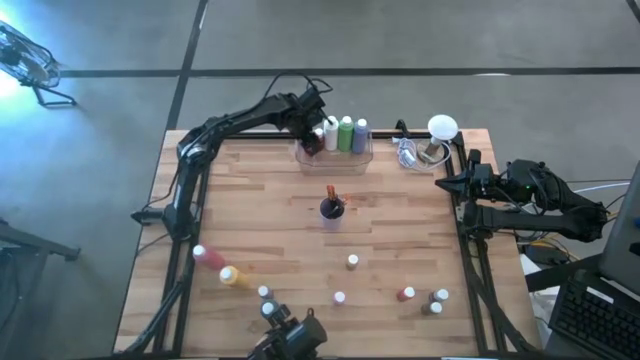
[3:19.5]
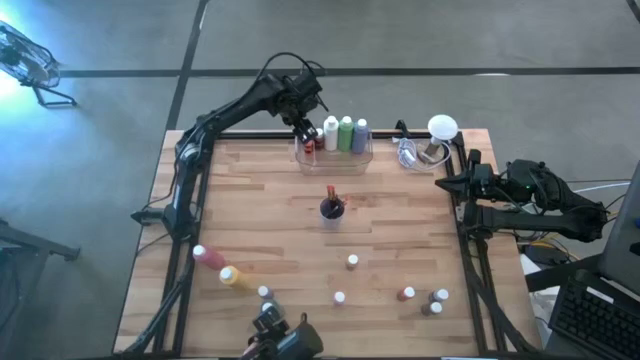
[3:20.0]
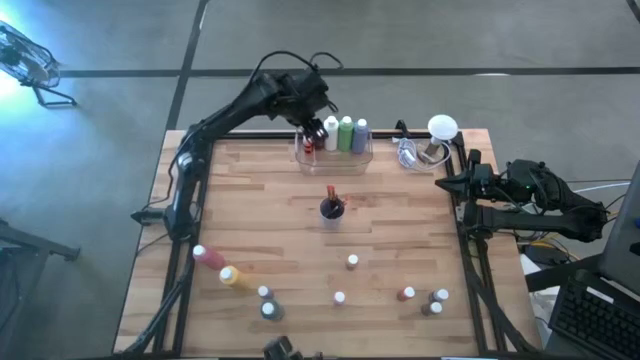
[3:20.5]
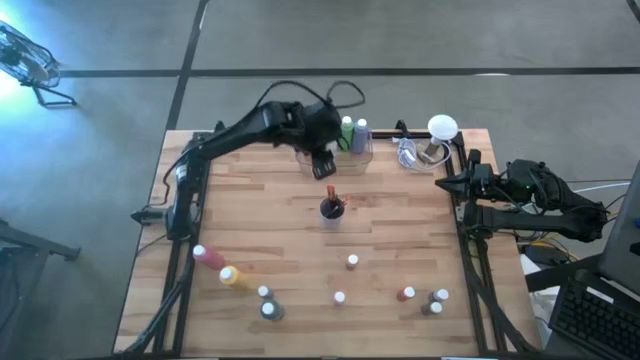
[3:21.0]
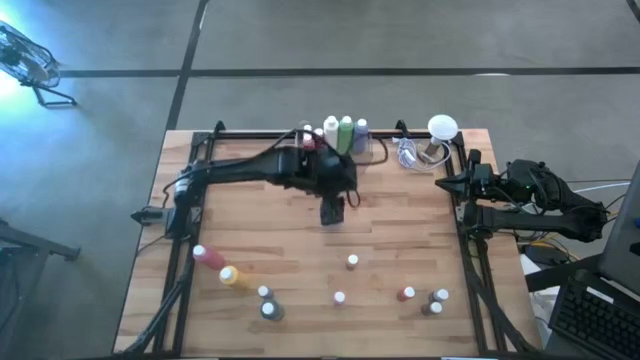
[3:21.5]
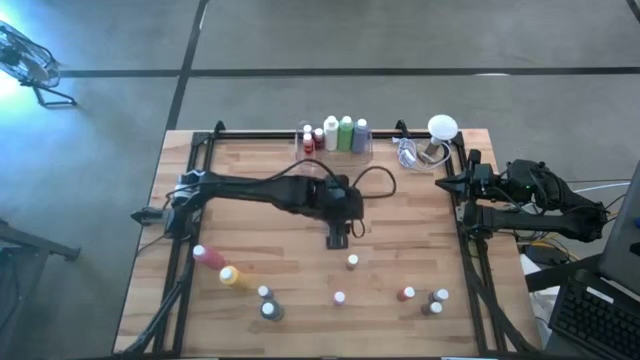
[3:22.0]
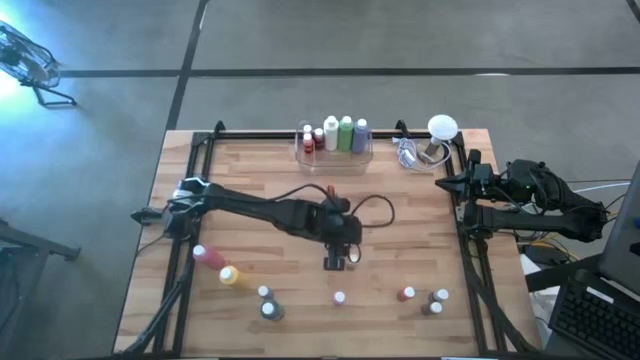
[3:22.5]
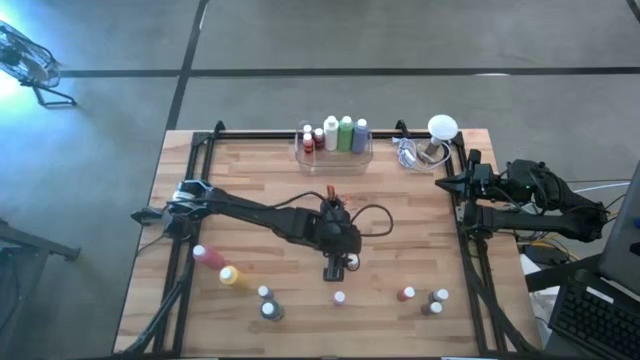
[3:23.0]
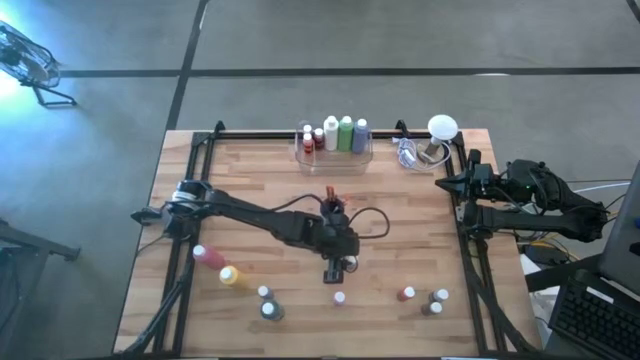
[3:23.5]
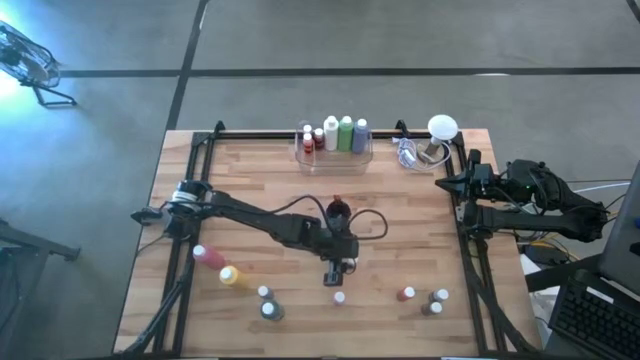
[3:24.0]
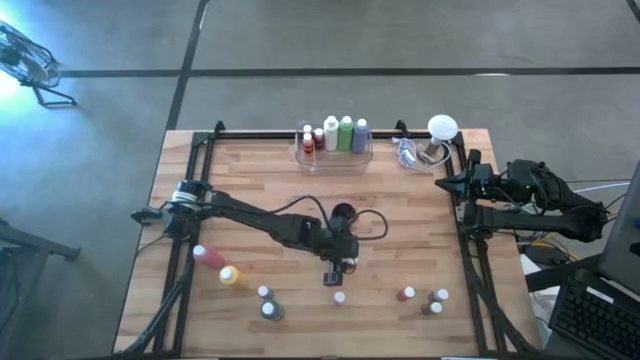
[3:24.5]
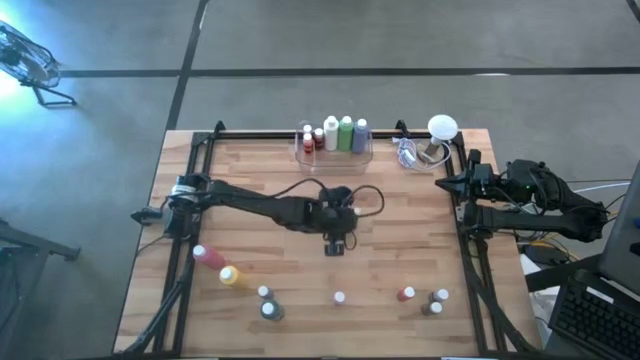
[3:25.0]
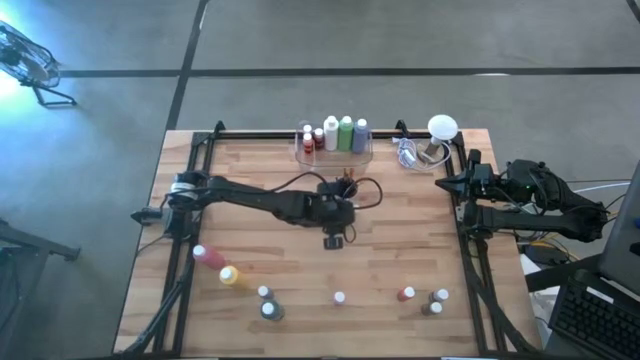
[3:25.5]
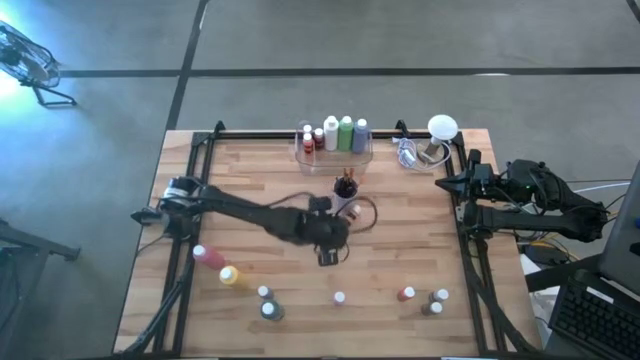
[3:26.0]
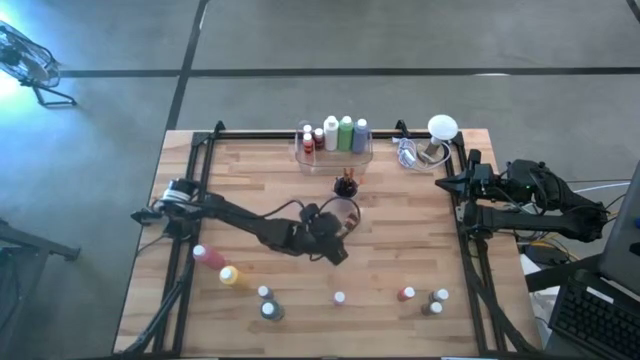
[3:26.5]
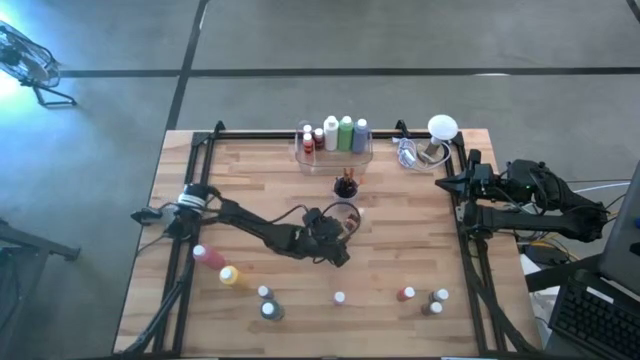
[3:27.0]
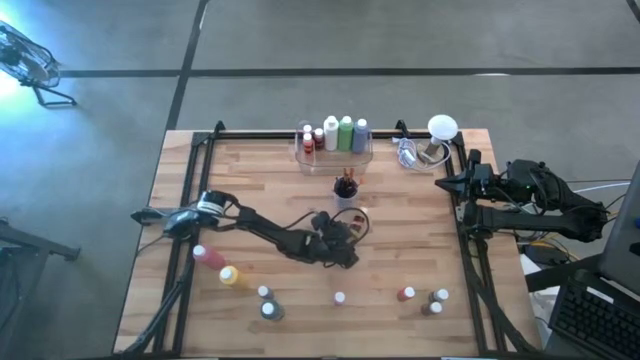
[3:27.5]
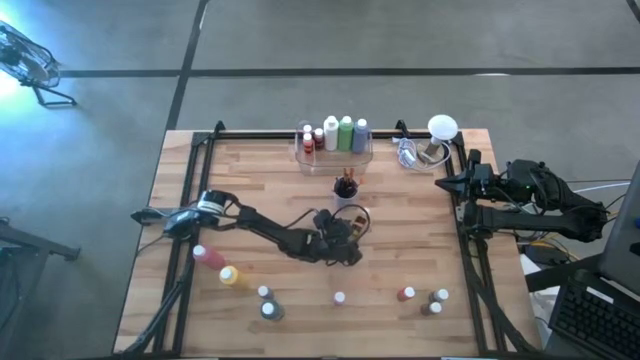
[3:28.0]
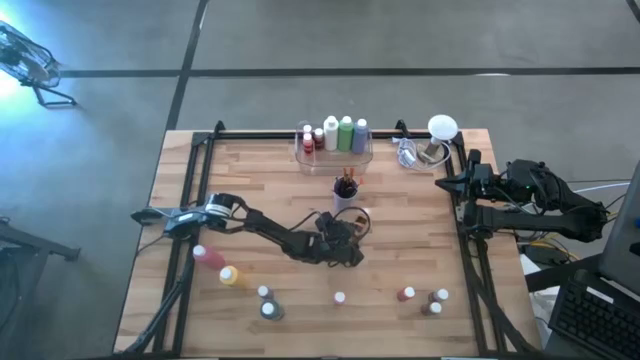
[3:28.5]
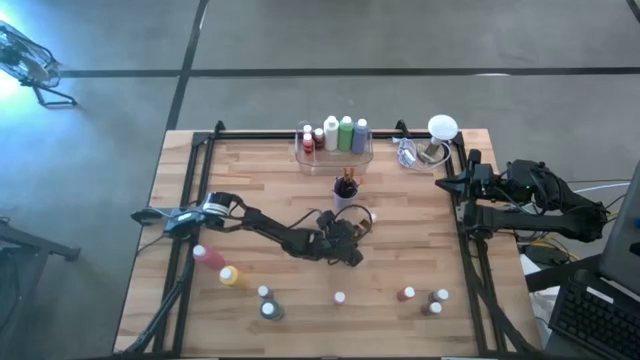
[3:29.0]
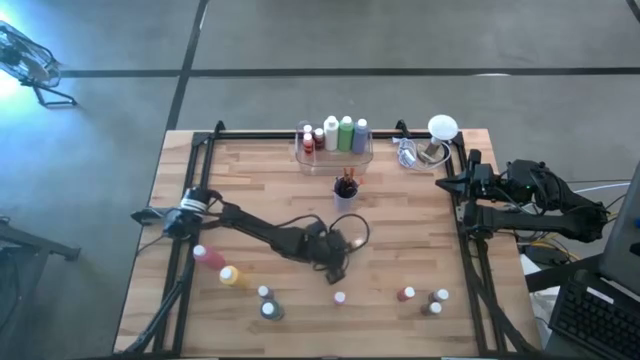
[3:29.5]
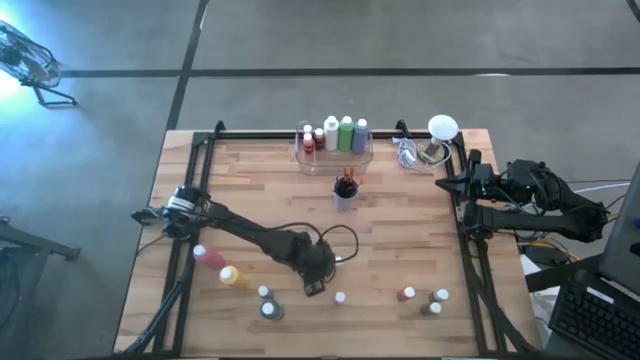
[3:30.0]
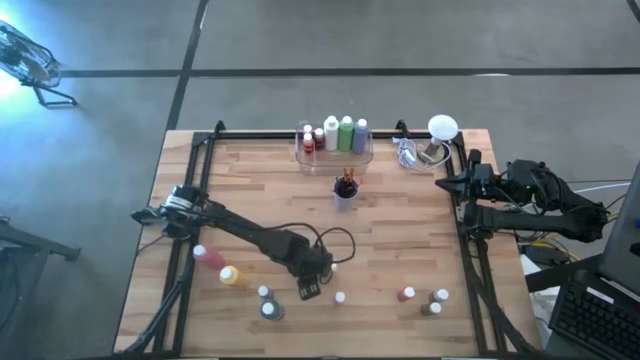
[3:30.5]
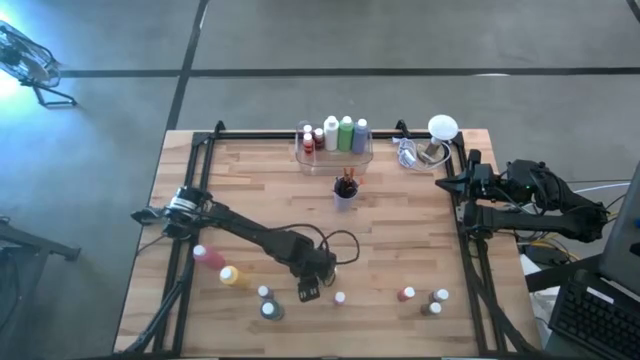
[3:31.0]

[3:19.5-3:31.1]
Task: Pick & Place Paint Supplies
Put the yellow black paint bottle into the transparent bin

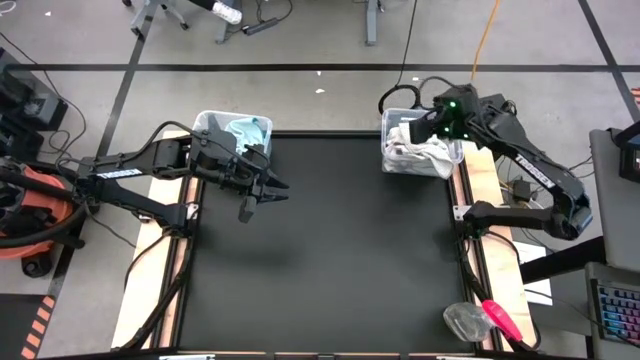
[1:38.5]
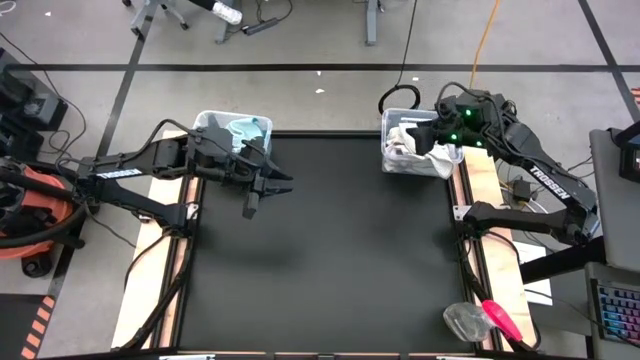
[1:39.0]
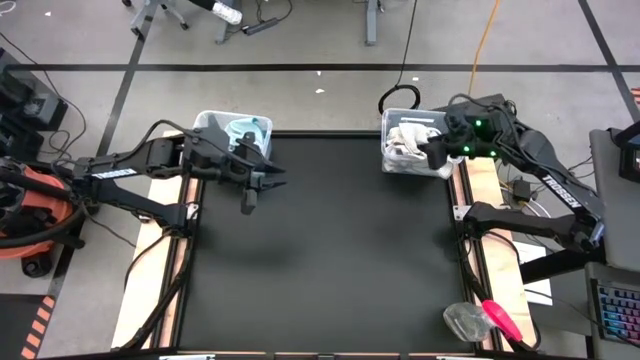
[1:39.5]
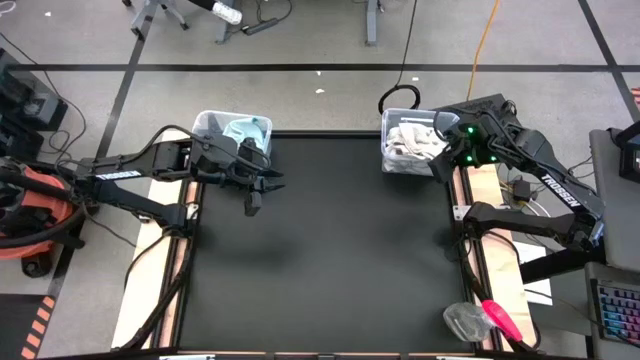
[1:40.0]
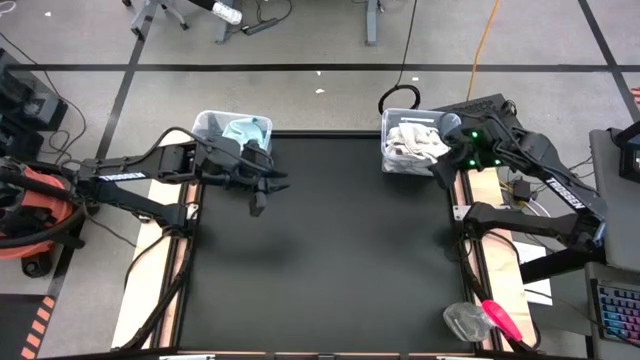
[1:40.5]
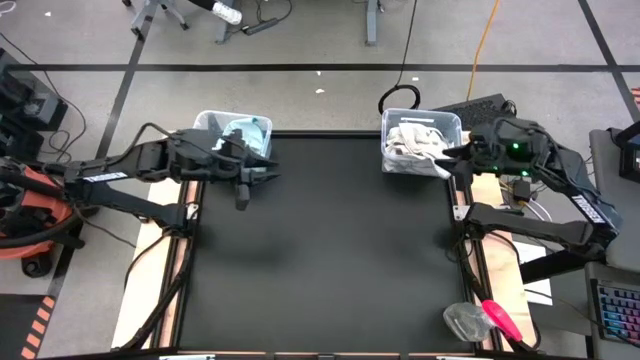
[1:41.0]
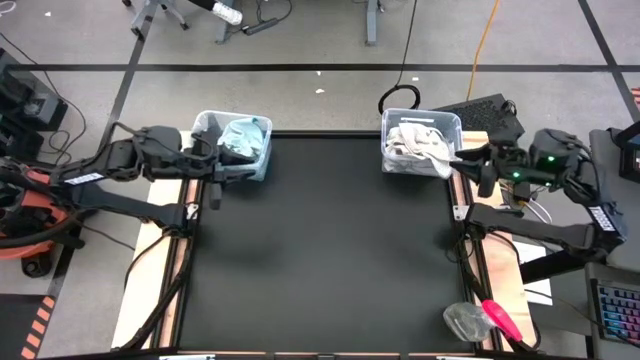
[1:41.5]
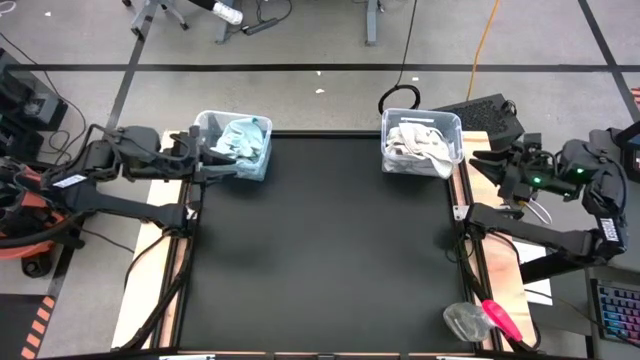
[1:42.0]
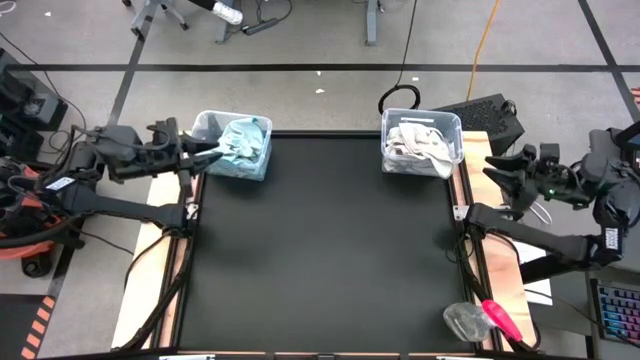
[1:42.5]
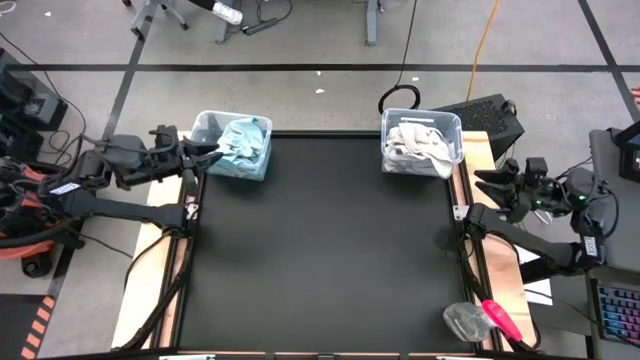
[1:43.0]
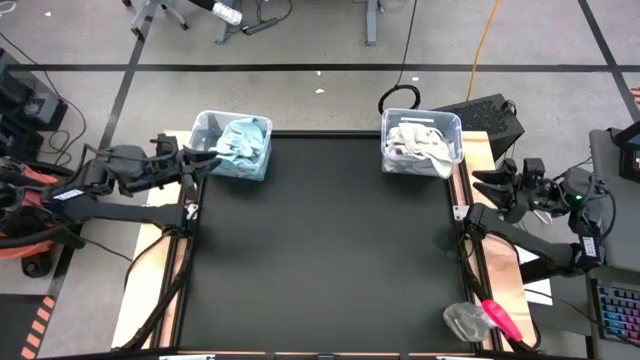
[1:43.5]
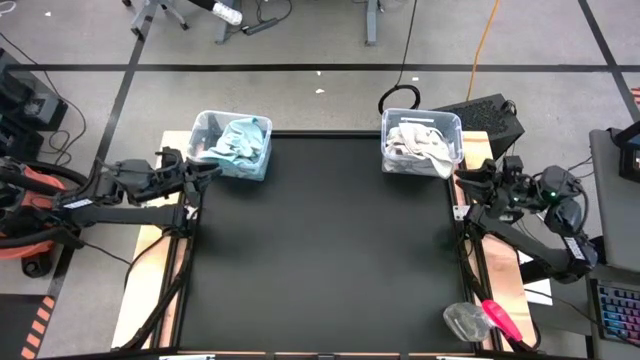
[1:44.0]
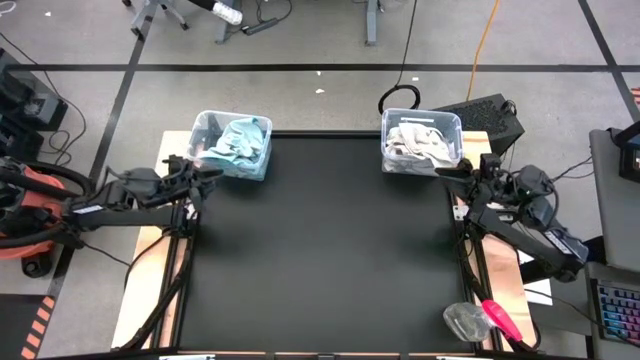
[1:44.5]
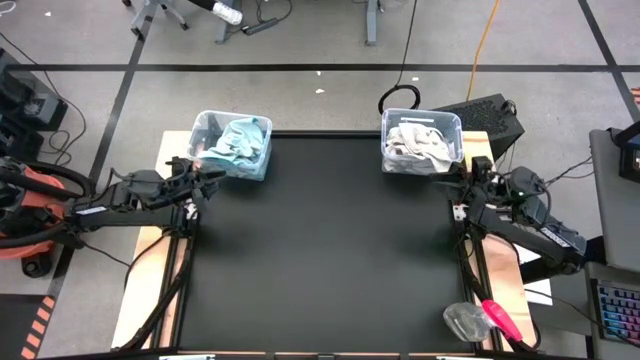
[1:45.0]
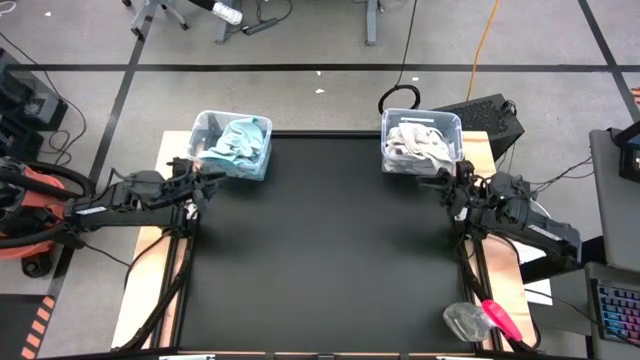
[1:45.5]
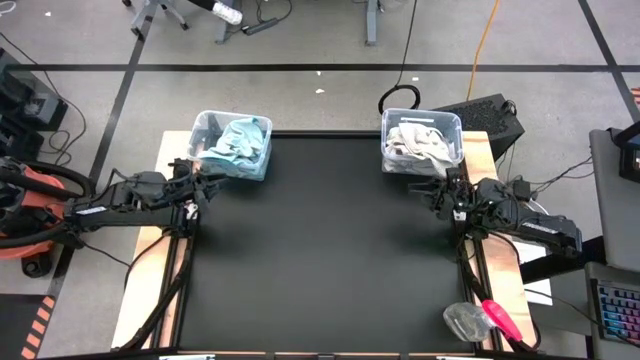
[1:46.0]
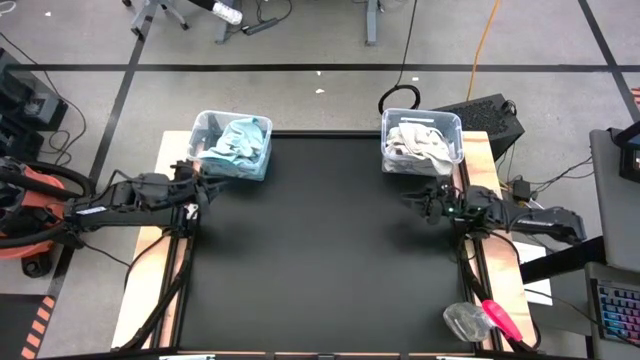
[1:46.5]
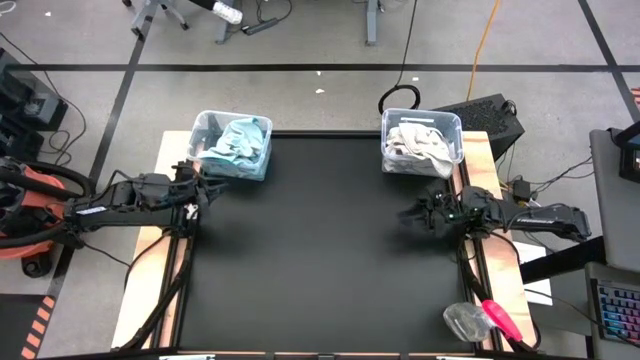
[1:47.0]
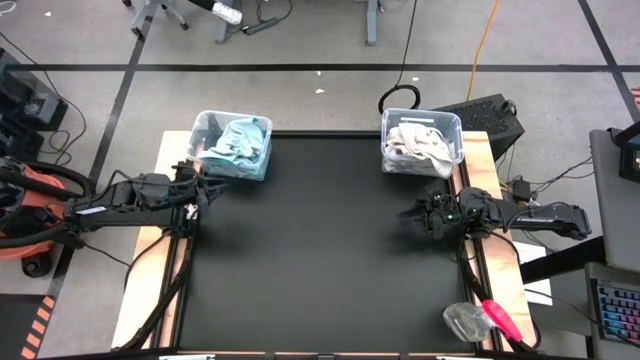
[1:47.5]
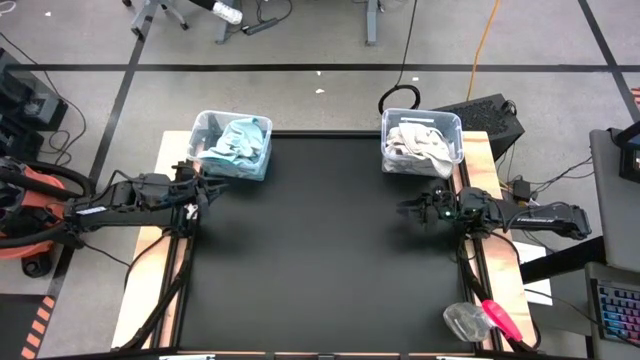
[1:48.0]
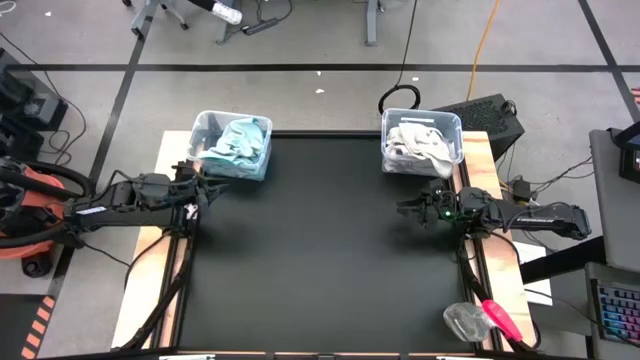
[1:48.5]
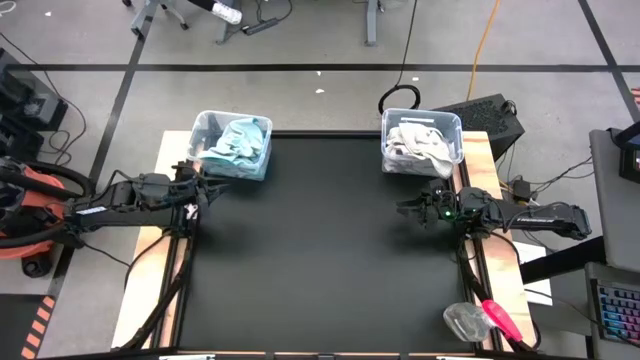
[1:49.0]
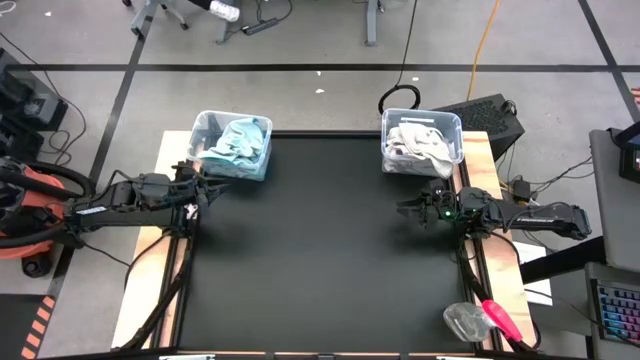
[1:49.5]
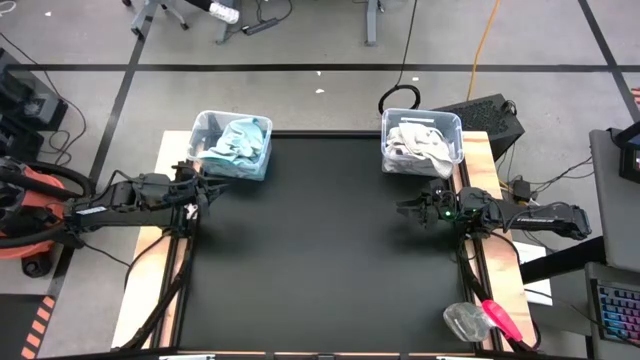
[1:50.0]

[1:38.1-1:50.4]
Task: Sort microfiber towel by color & place in baskets
Return to Home Position
